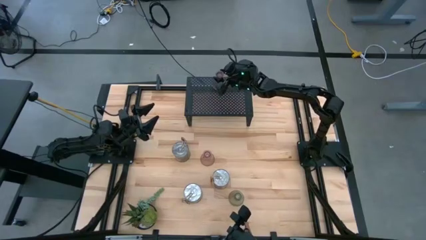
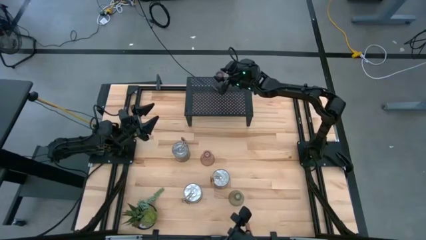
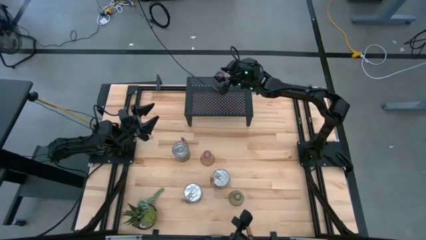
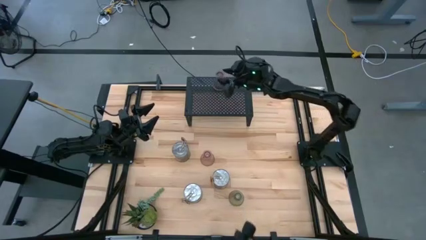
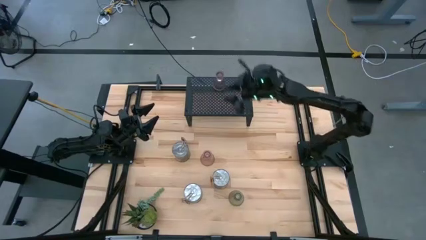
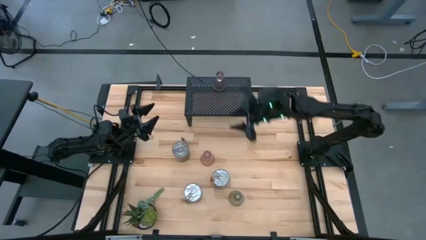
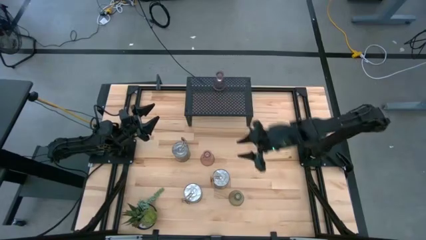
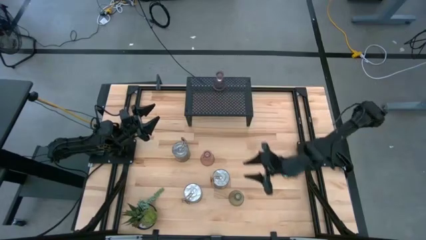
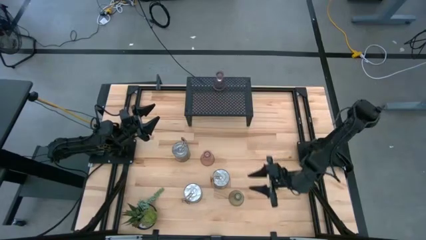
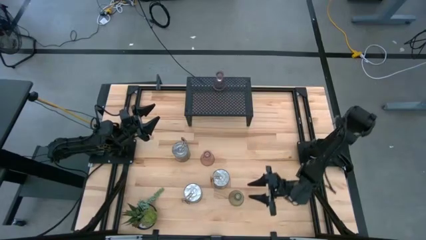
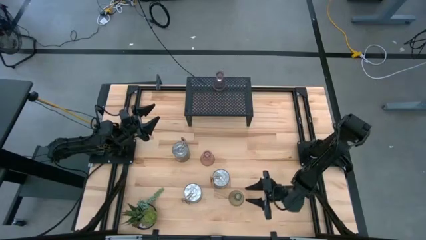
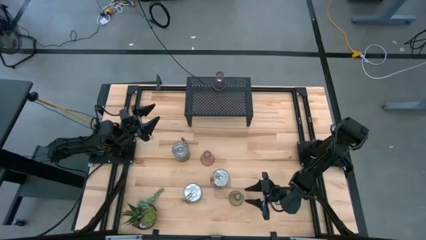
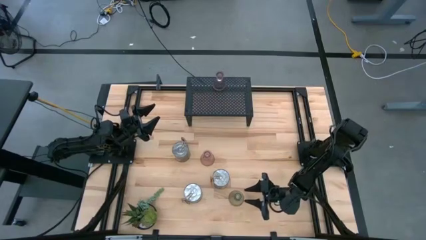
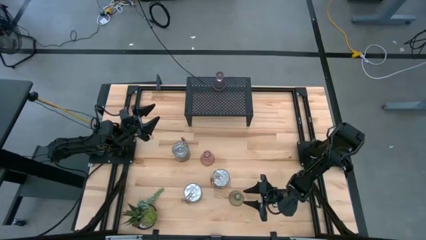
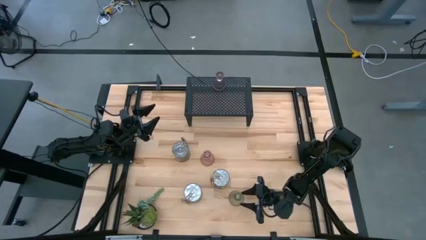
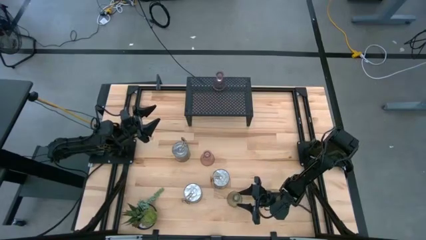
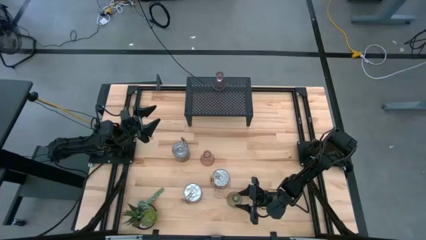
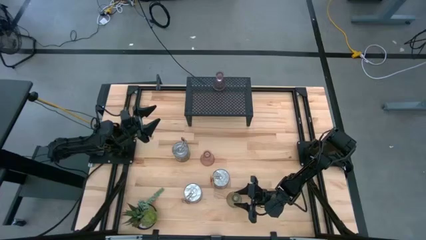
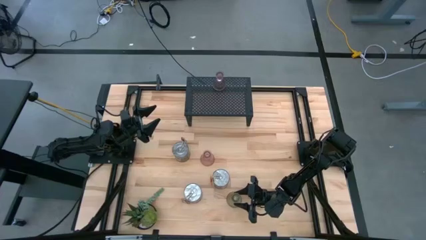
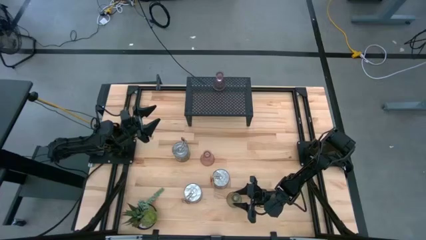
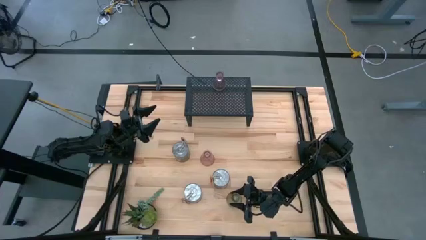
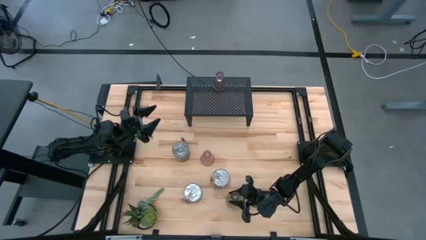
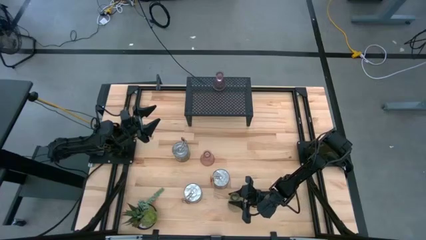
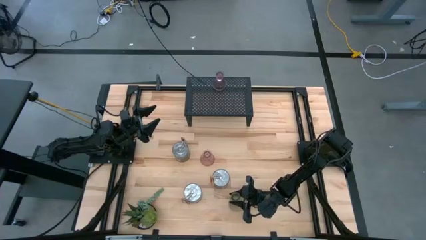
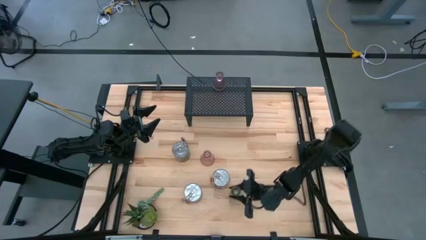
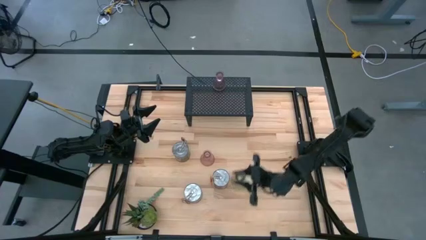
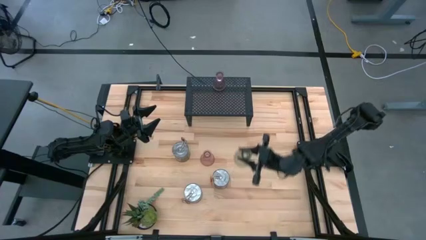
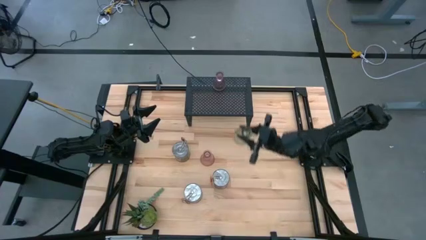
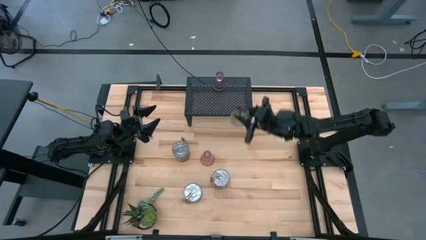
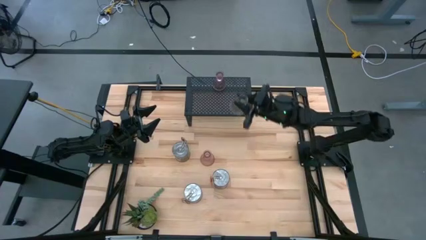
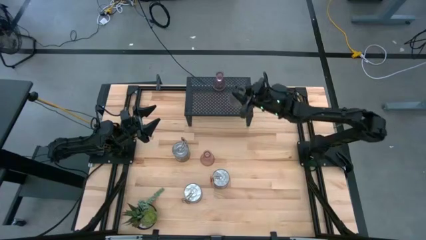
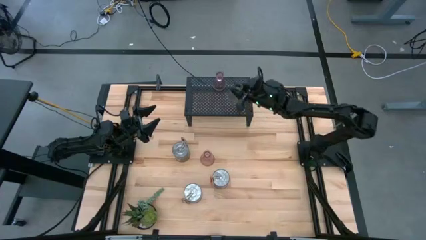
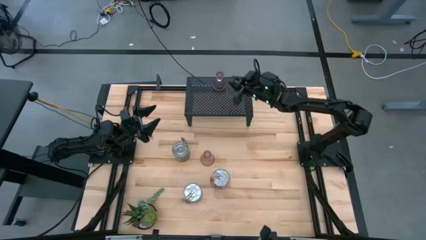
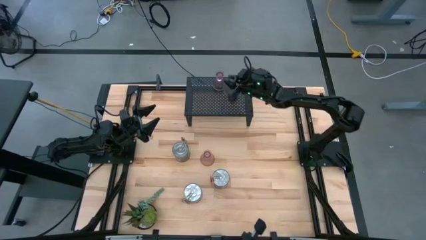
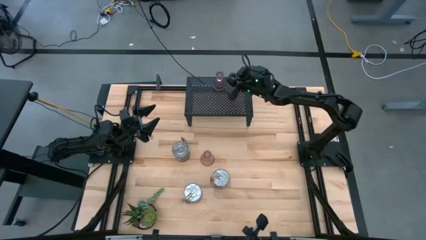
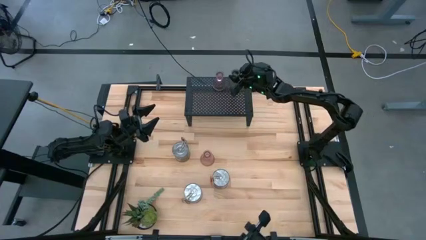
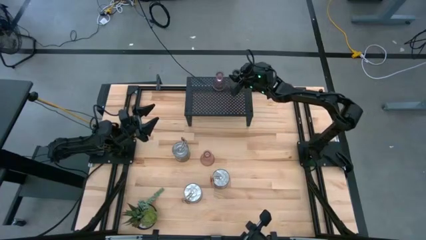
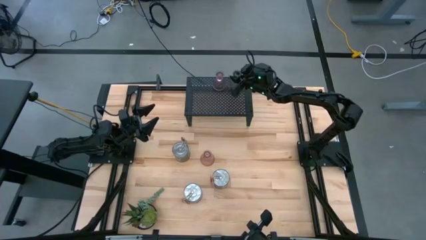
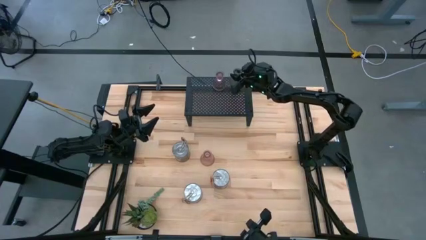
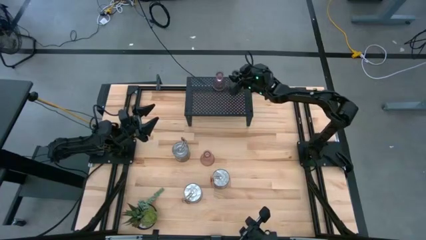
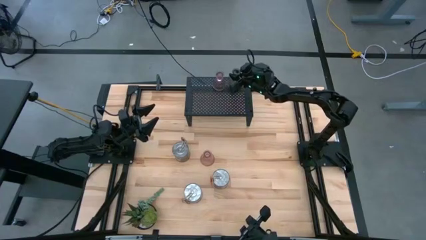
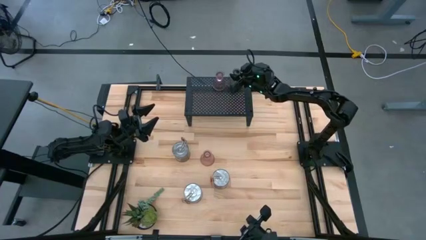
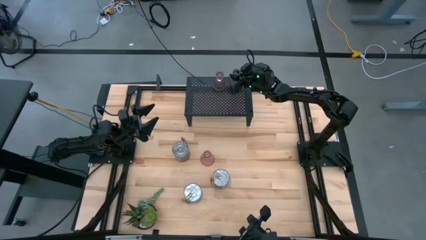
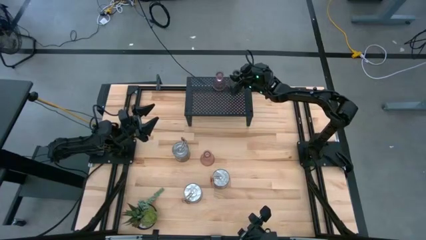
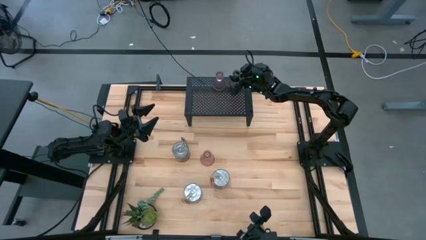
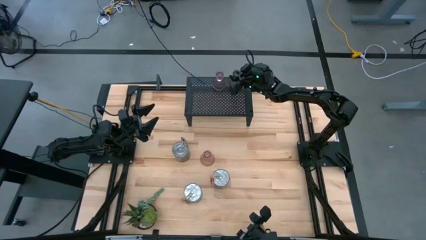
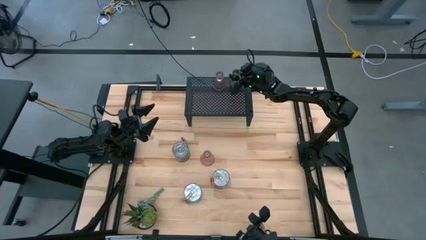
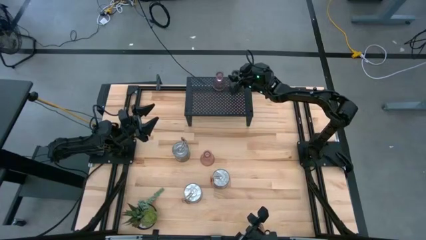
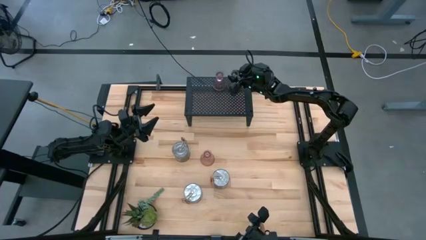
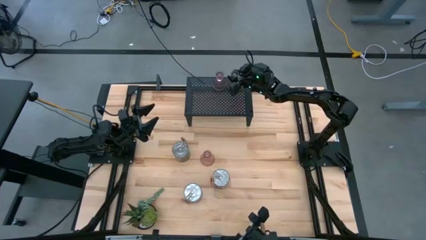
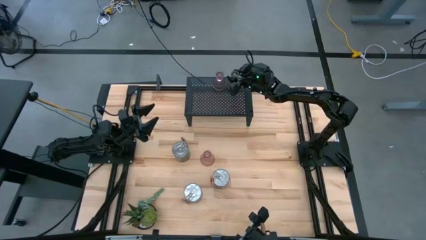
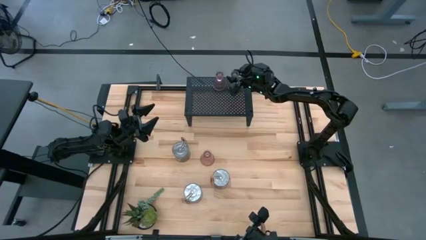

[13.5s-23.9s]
Task: Pick & Place candle stick holders
Align the green candle holder with the red candle holder on the shelf

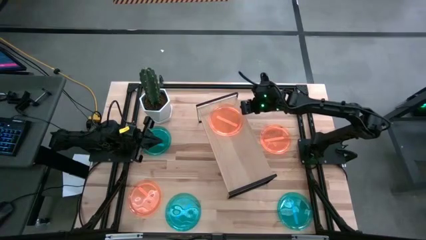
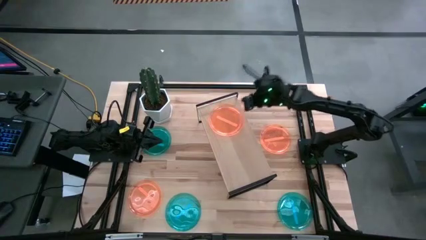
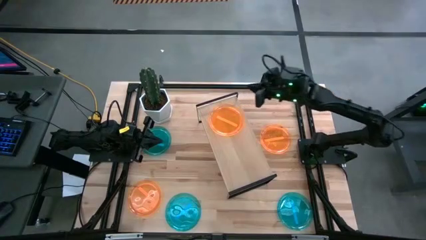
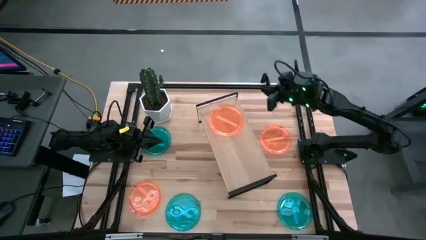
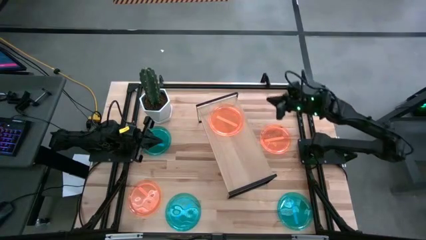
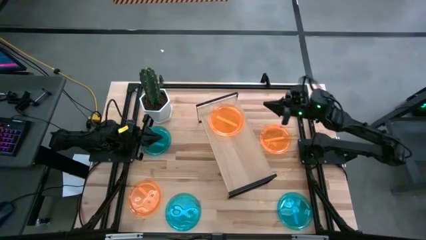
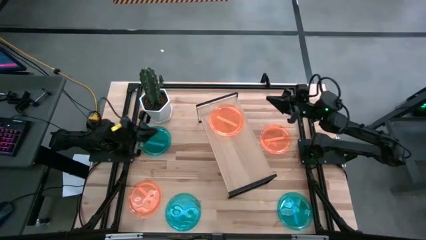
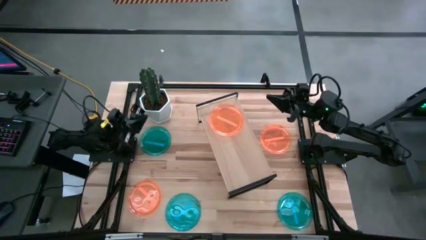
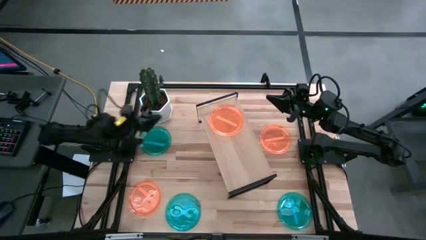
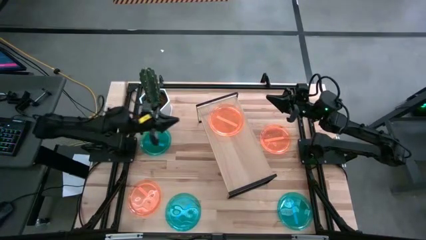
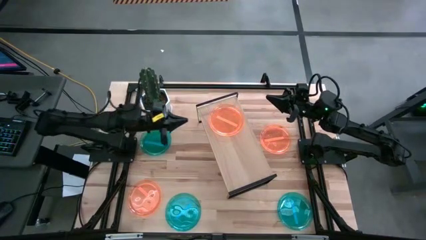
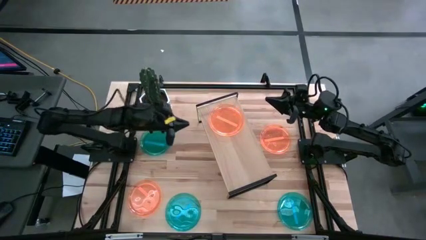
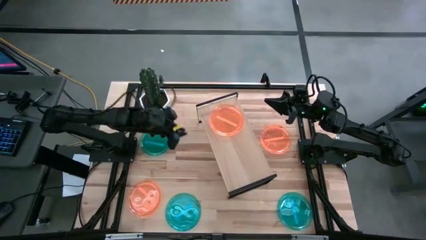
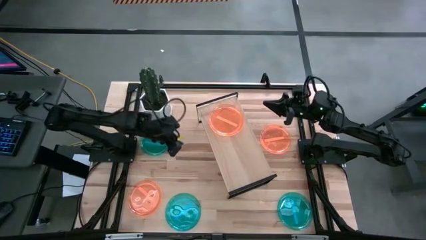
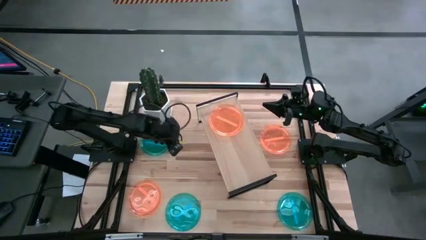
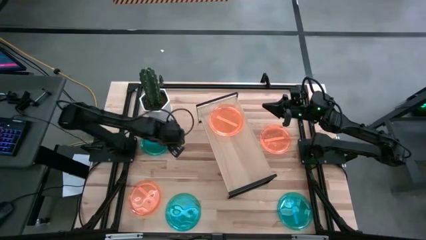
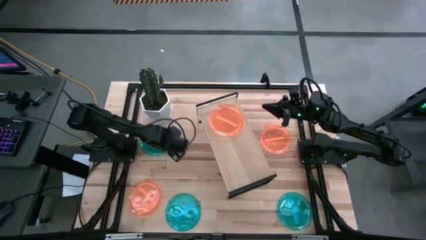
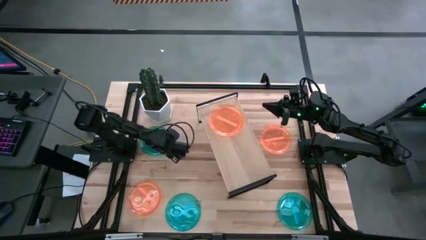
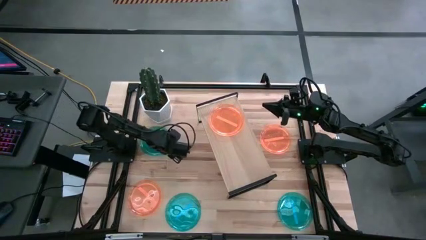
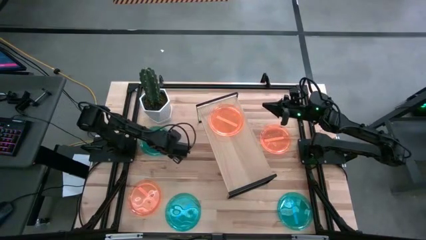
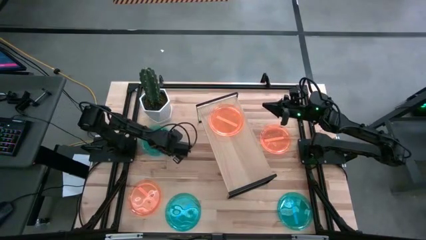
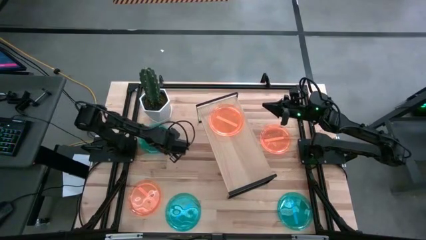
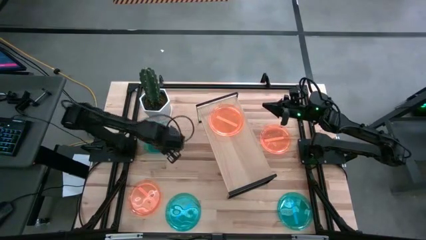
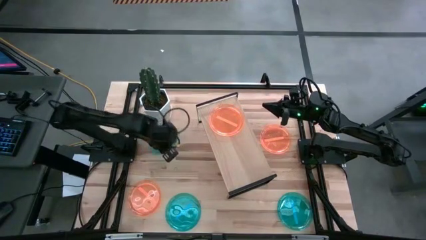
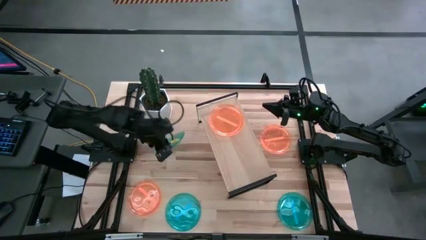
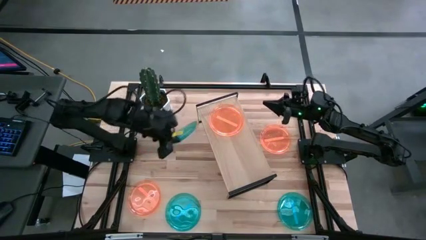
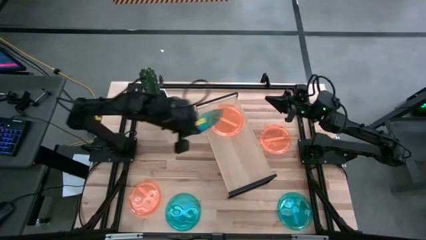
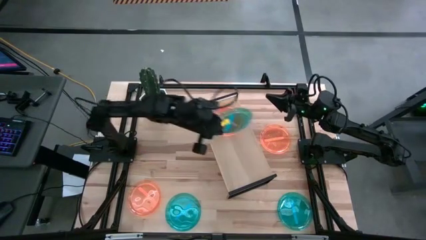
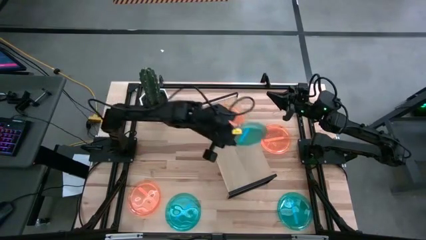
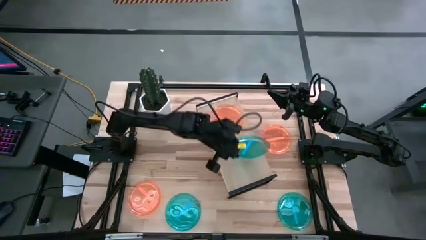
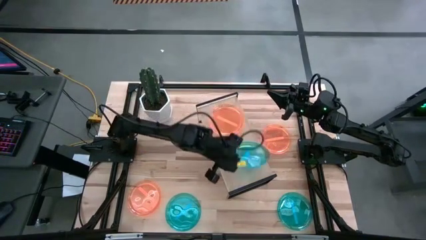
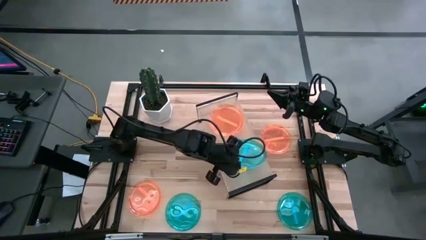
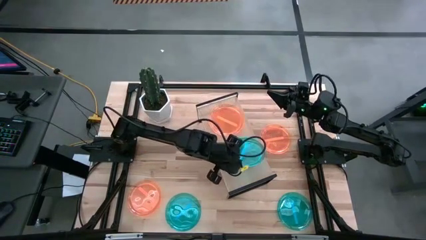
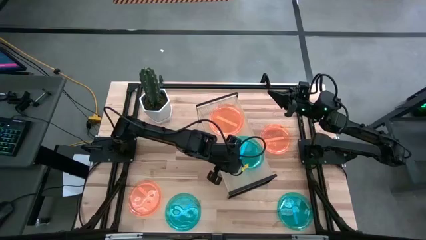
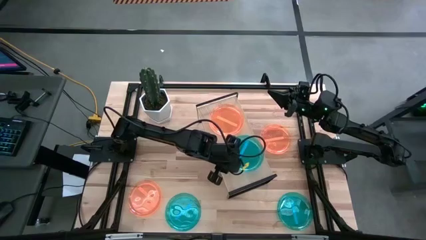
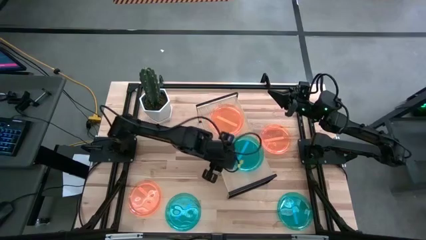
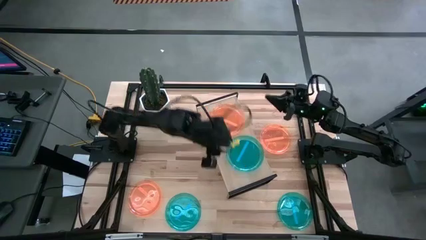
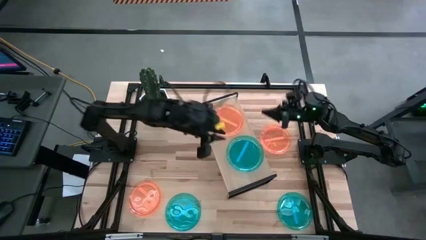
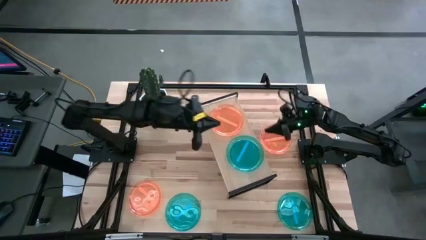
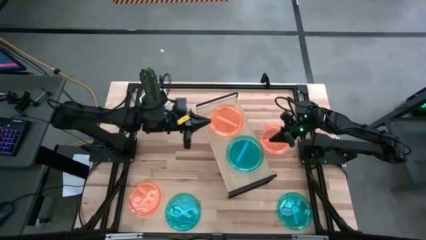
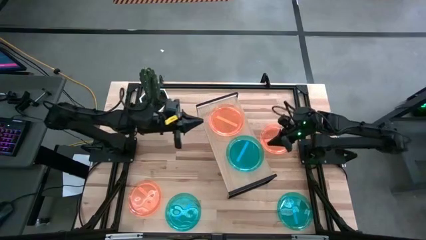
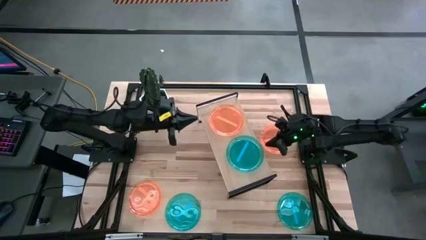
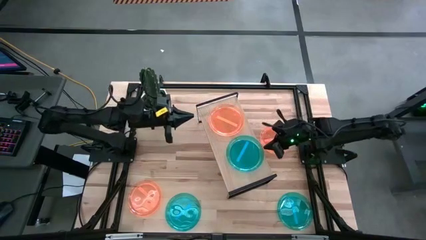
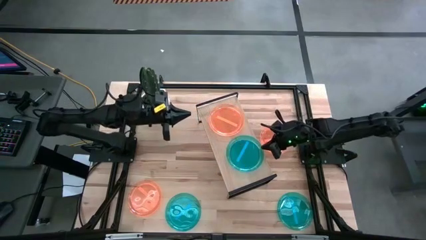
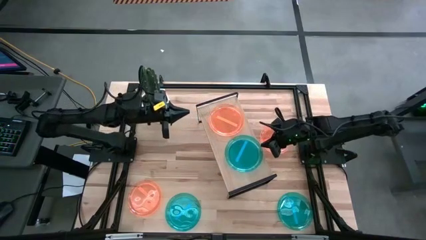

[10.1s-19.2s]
Task: Place and stack plates onto a shelf
Put the top blue plate on the shelf
